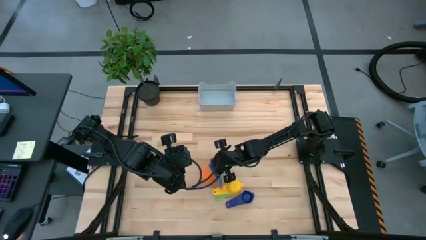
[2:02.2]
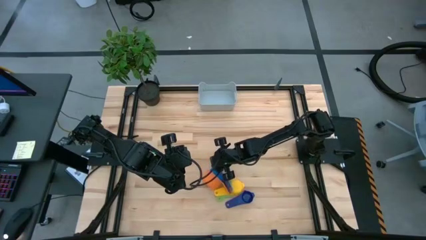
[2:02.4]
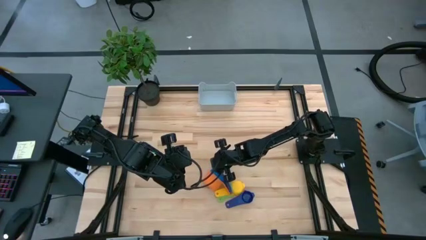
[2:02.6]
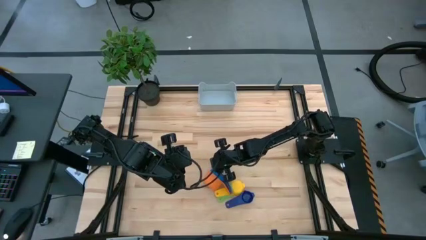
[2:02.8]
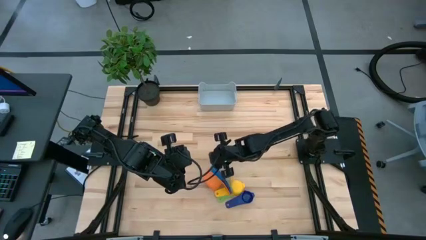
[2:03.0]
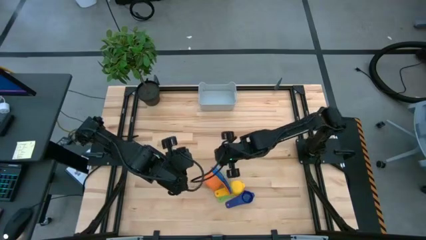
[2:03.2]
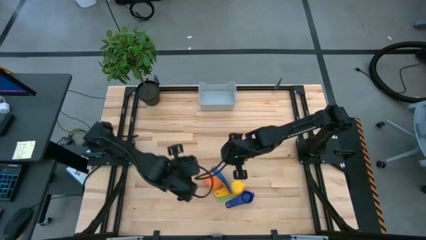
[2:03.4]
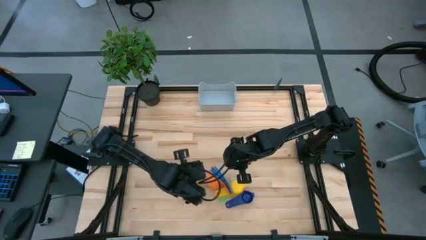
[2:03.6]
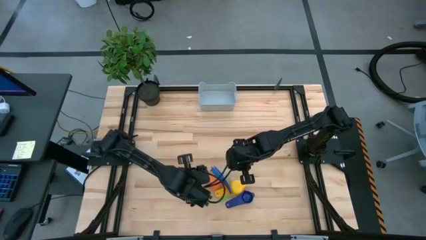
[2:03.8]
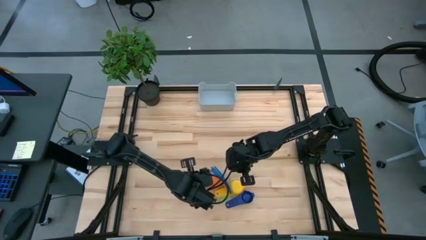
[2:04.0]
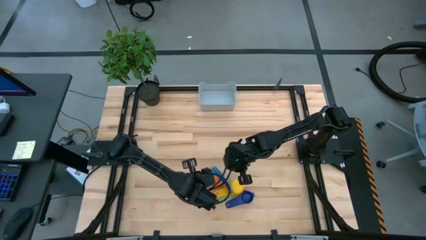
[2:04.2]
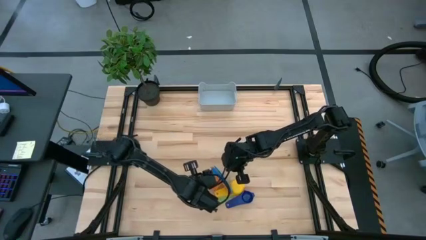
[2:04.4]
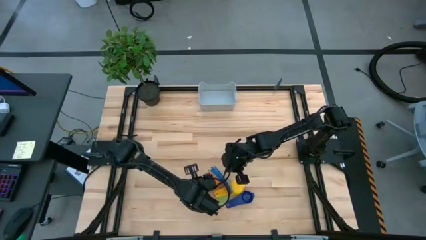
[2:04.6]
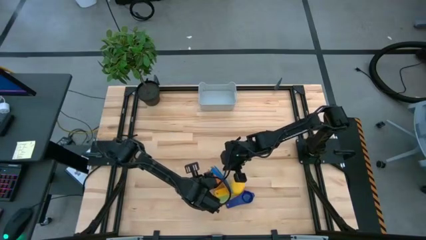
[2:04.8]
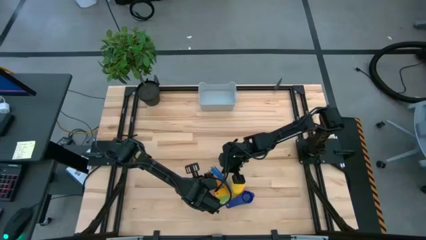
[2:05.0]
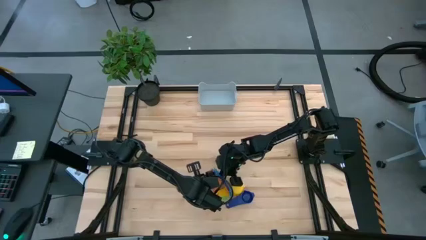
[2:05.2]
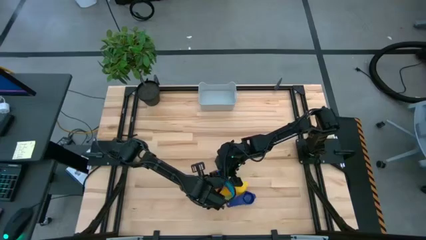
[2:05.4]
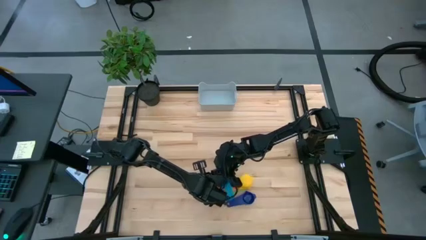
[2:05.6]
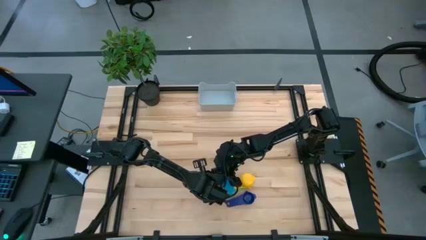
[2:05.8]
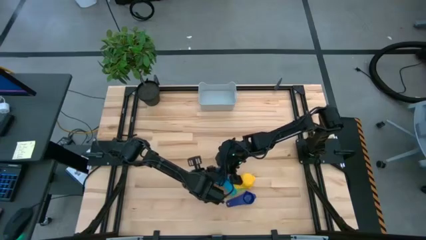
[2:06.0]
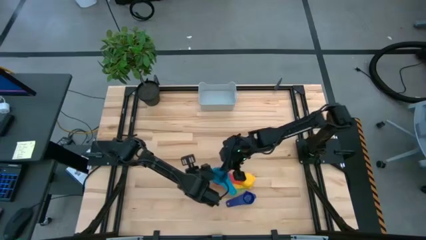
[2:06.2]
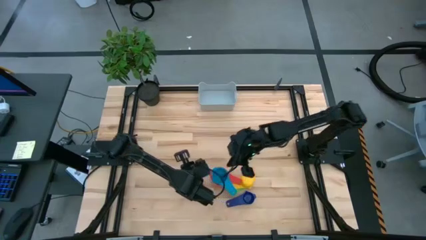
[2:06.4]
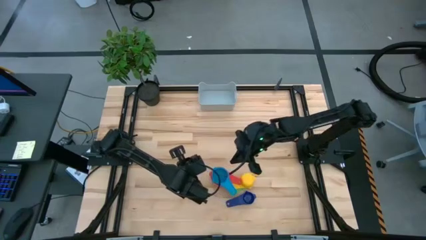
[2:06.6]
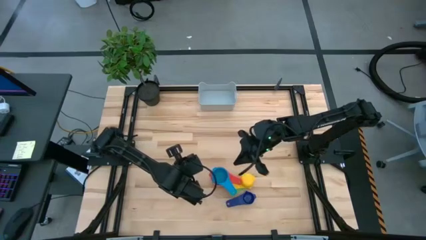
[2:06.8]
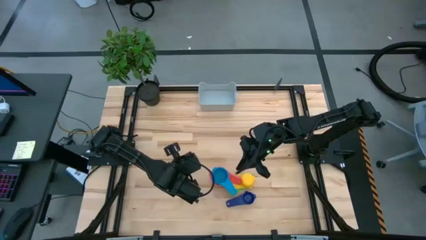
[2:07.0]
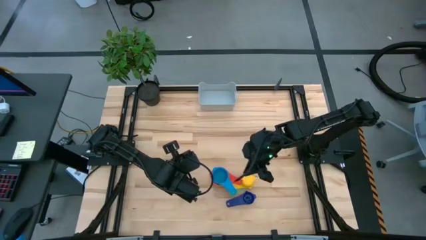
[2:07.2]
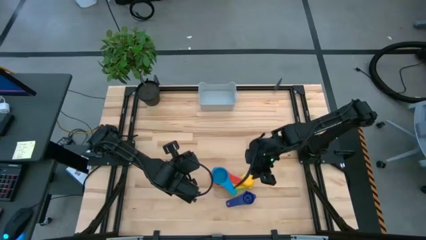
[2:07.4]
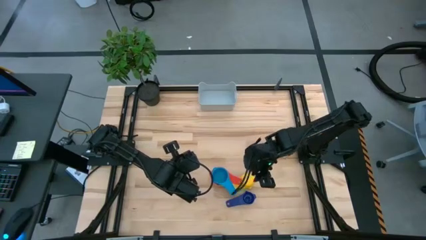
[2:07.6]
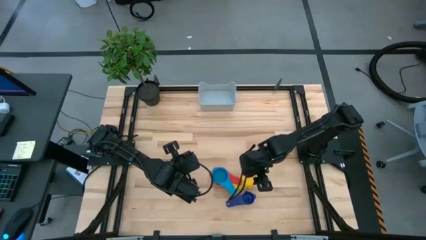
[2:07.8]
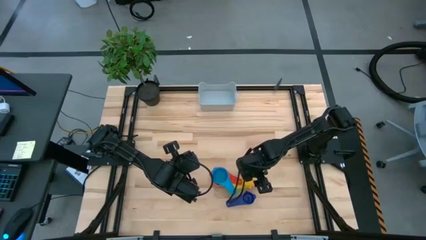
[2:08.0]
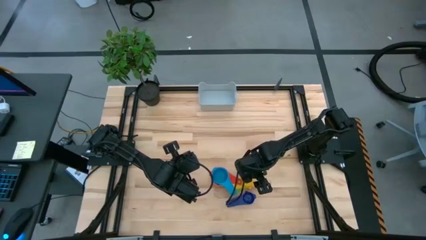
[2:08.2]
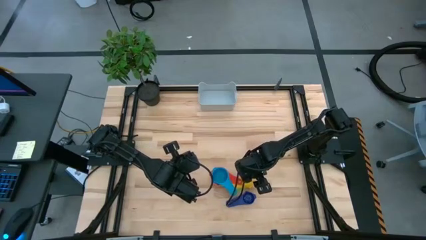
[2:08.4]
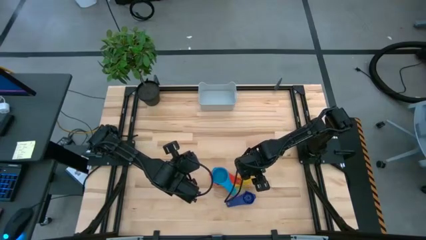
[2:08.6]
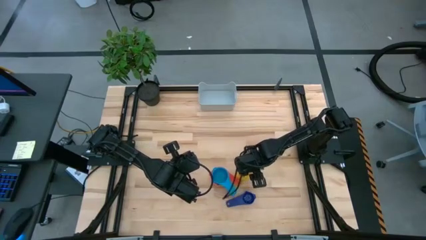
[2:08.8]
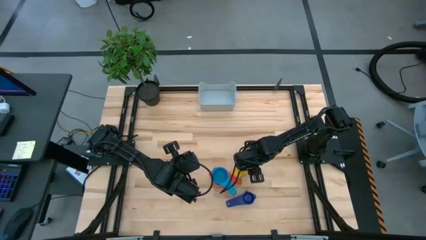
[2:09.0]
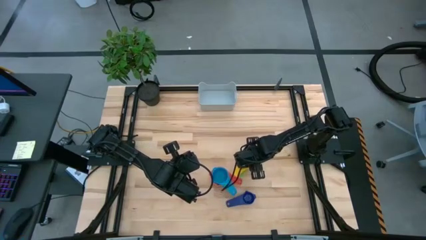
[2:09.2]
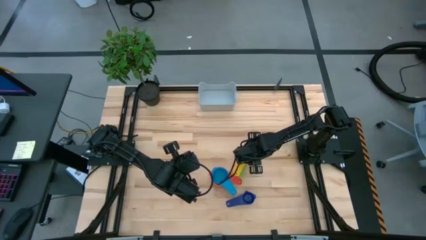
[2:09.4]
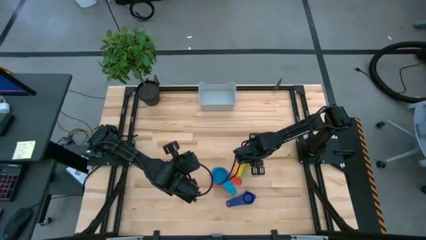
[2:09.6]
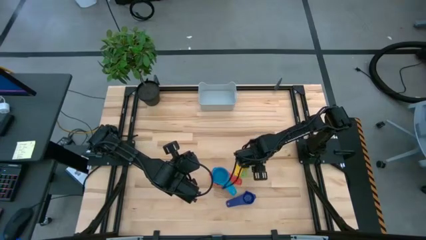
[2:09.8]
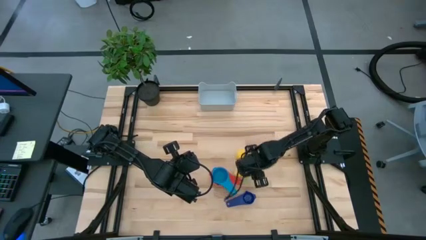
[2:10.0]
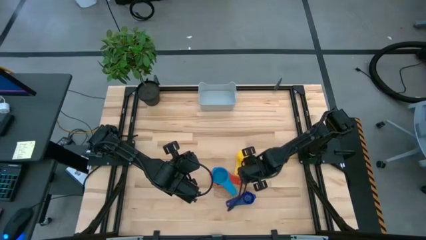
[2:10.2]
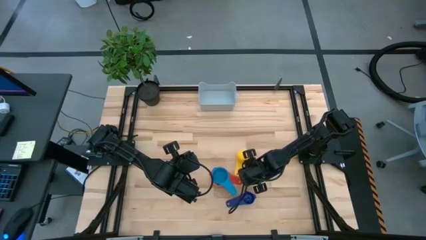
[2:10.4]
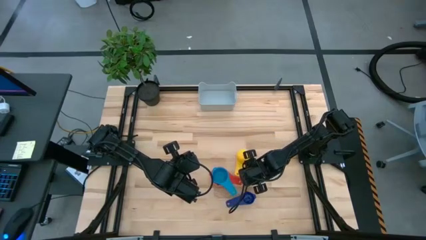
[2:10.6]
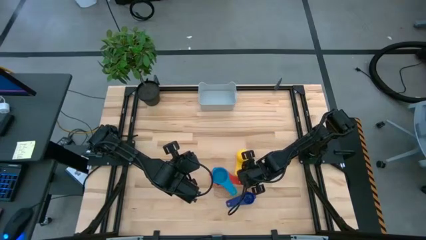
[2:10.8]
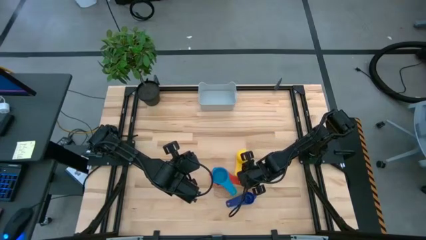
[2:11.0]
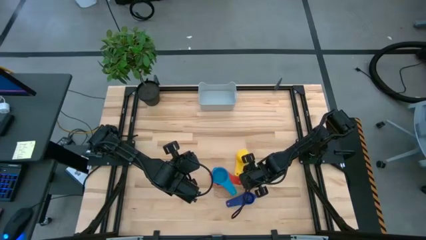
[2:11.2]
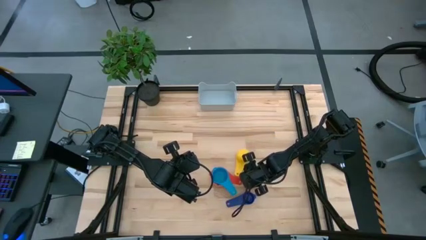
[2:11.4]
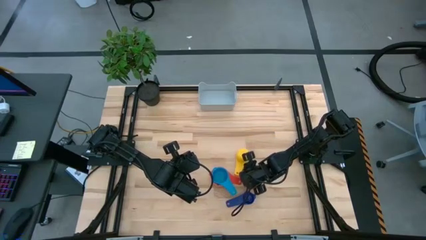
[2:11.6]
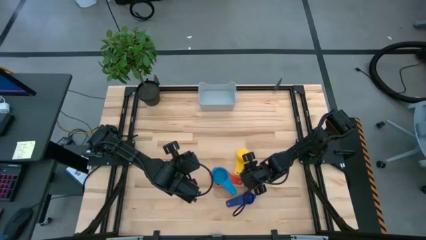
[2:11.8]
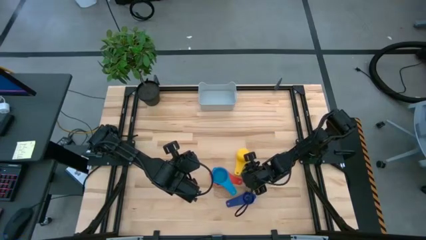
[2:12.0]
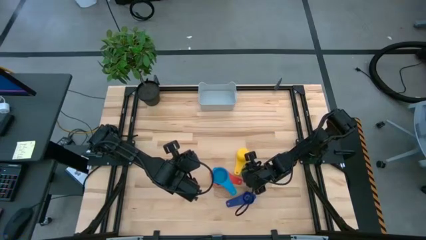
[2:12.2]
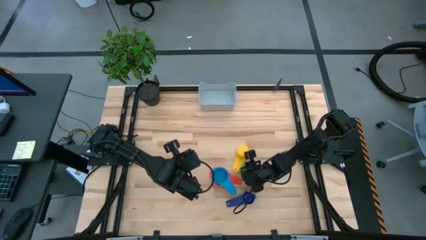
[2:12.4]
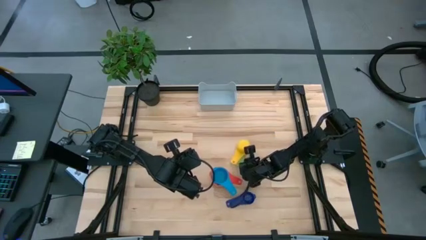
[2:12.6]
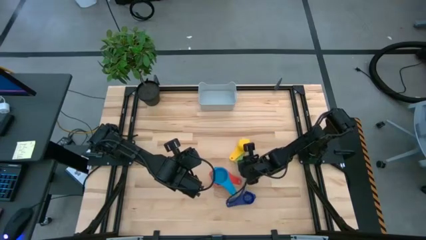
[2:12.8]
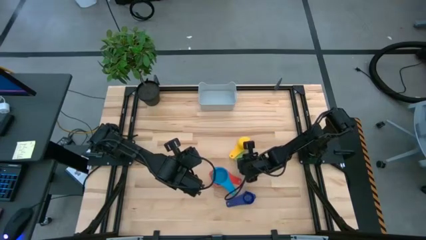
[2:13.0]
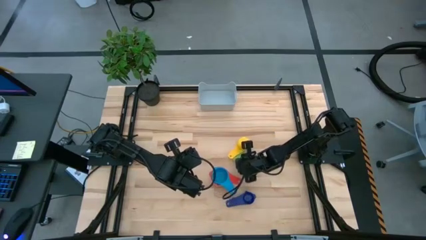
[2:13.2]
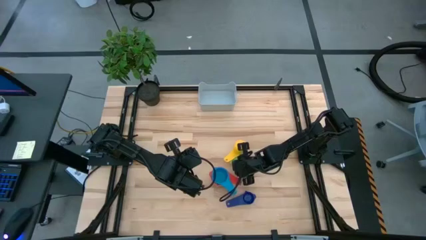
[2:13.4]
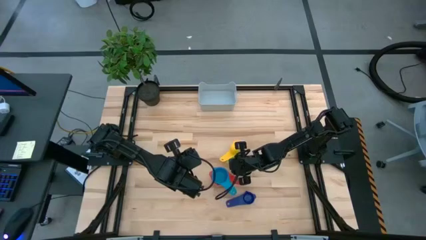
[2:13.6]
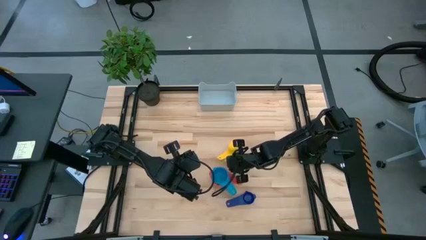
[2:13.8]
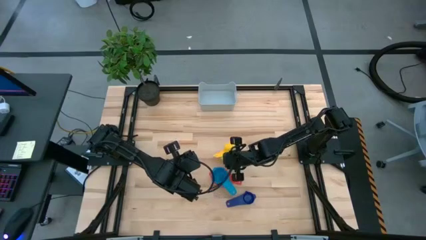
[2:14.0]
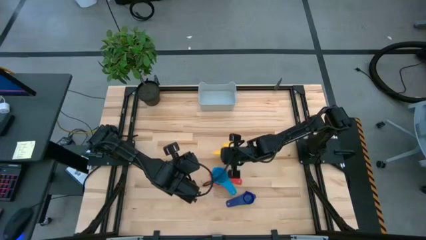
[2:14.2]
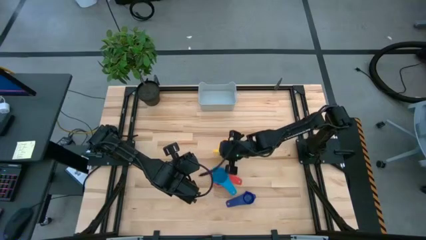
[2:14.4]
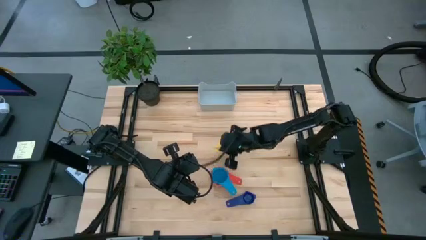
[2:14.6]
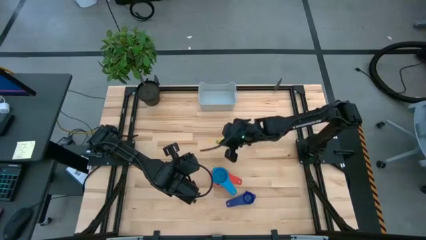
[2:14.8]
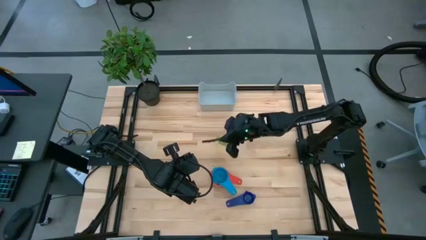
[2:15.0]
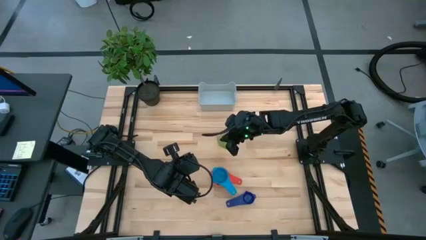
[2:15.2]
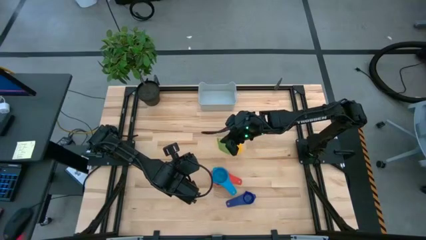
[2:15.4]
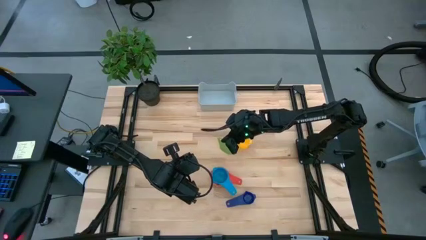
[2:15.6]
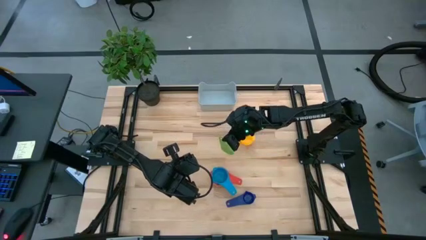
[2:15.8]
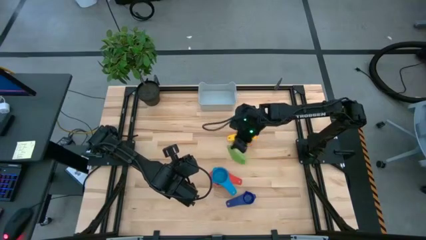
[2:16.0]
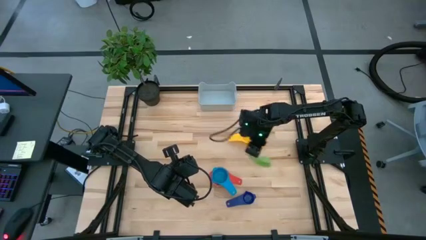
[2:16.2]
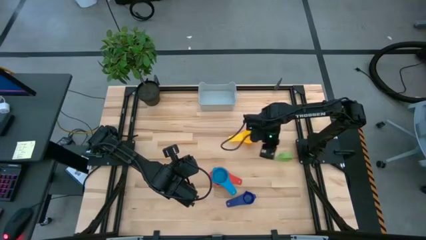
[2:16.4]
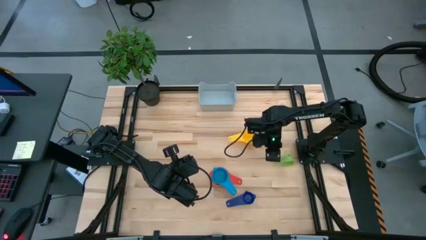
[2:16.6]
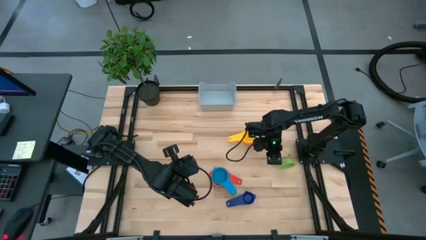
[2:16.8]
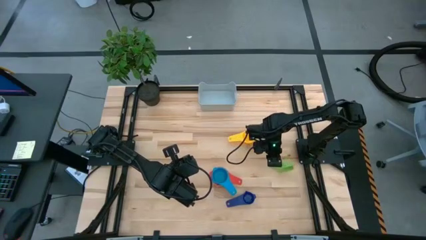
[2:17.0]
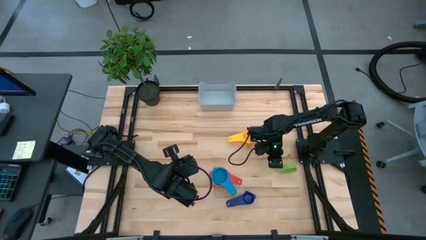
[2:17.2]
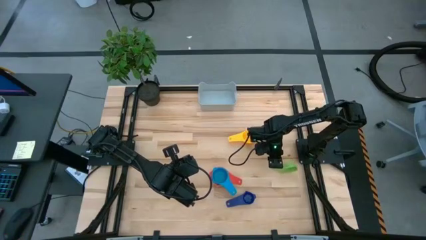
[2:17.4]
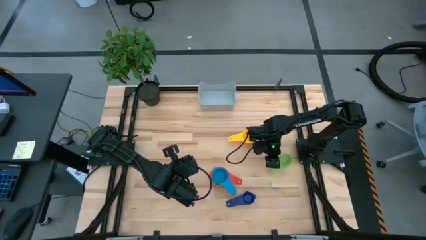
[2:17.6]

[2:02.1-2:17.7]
Task: Nest measuring cups in basket
Put the stacked measuring cups into the gray bin
